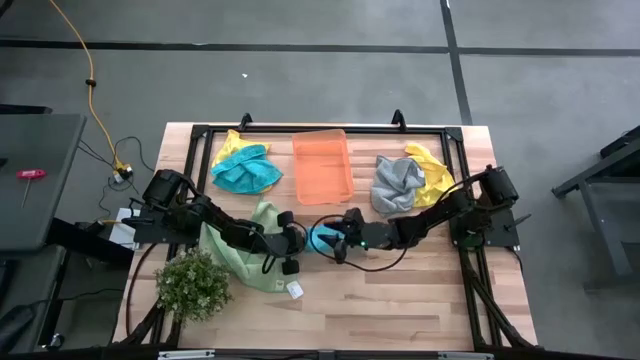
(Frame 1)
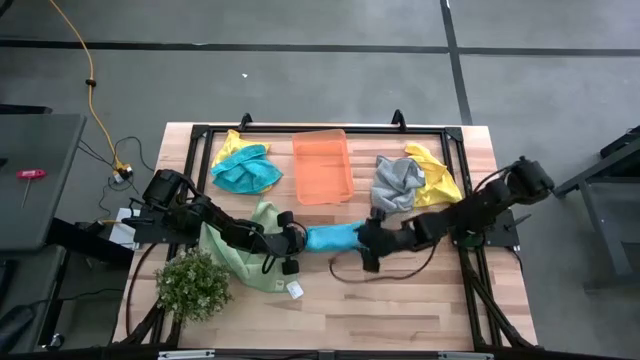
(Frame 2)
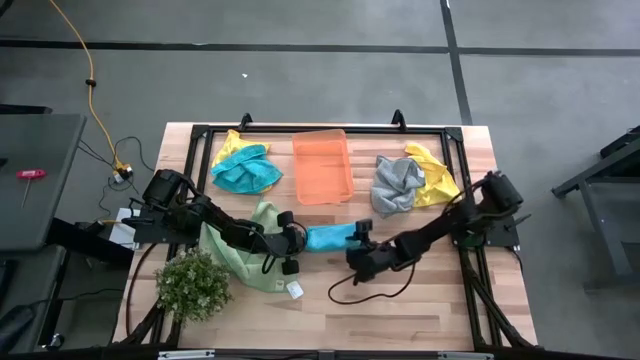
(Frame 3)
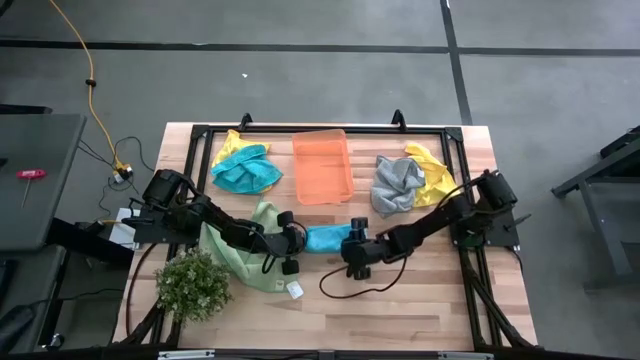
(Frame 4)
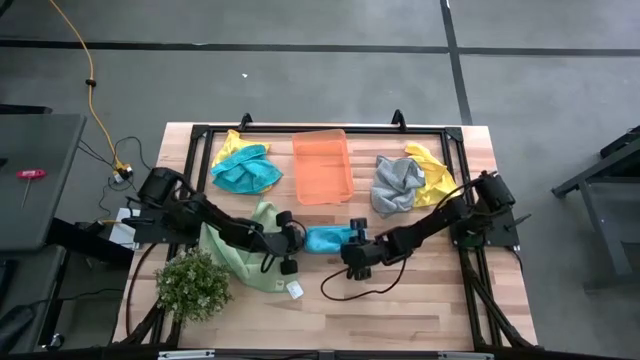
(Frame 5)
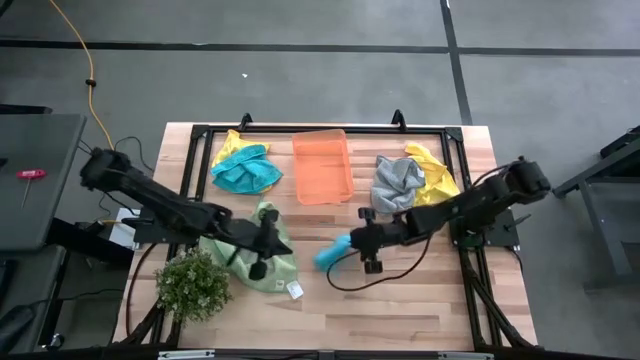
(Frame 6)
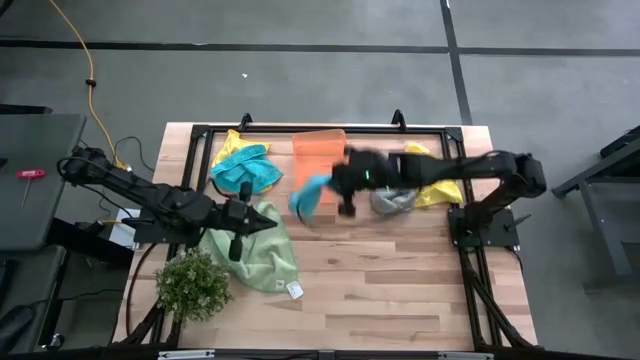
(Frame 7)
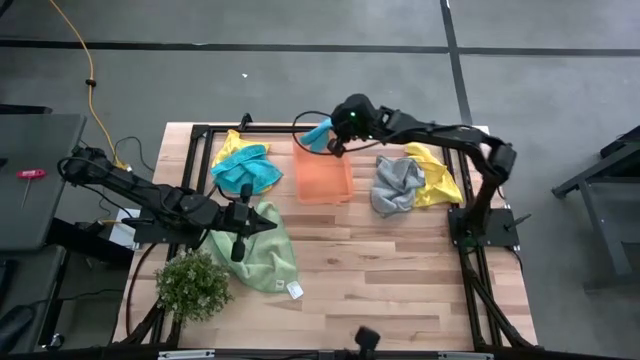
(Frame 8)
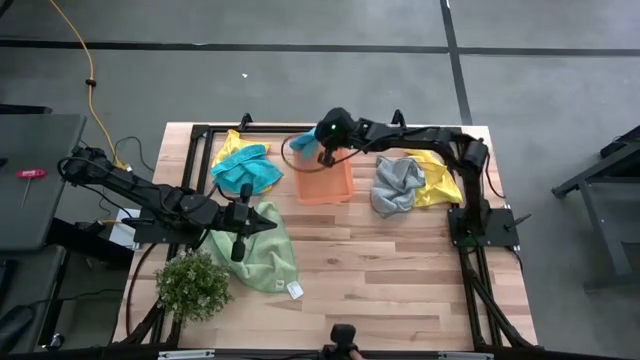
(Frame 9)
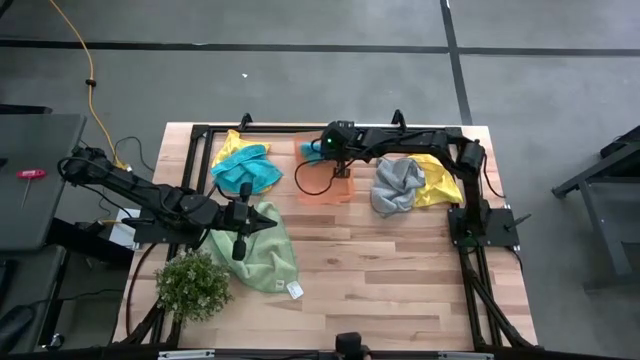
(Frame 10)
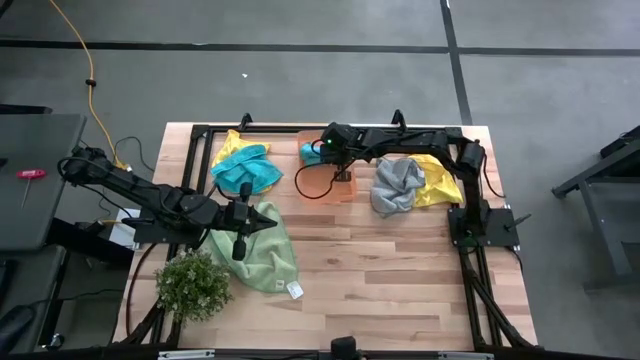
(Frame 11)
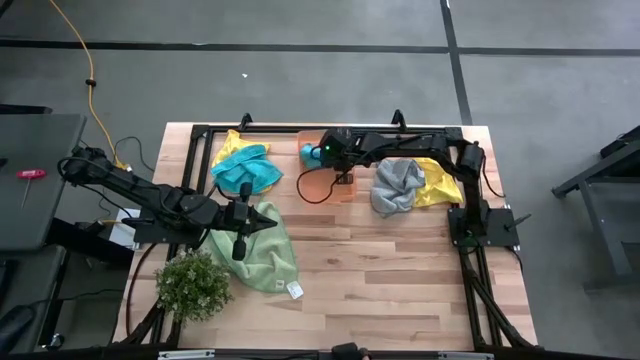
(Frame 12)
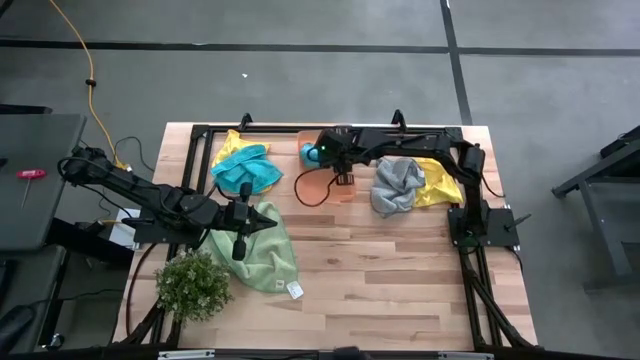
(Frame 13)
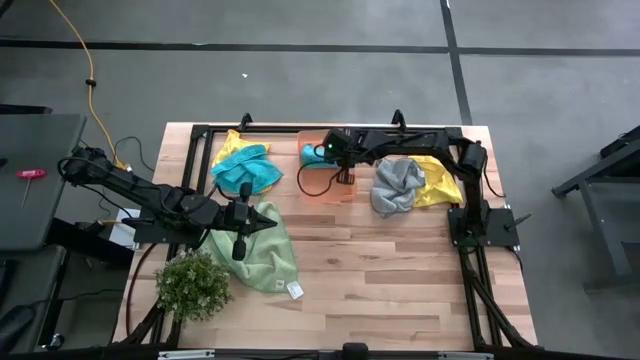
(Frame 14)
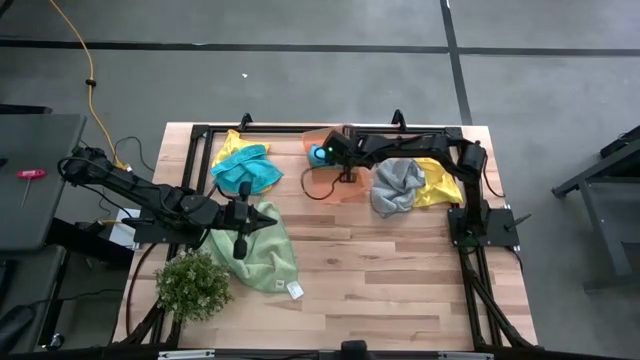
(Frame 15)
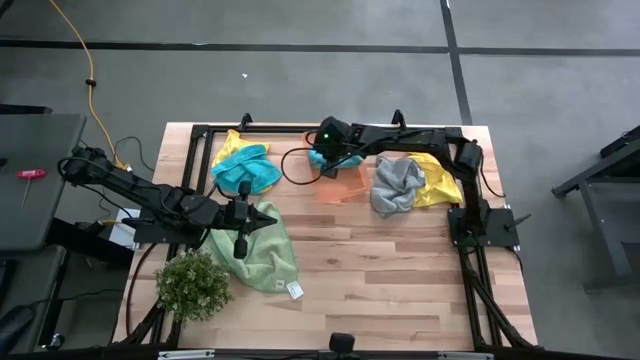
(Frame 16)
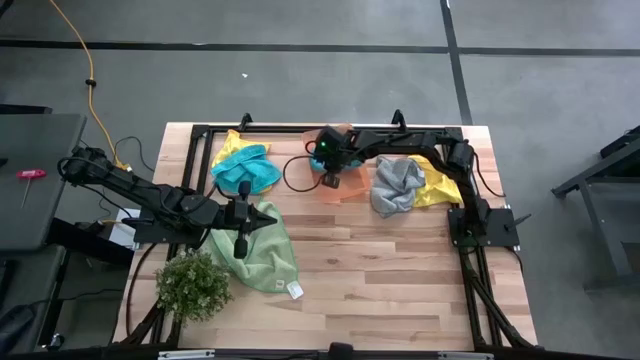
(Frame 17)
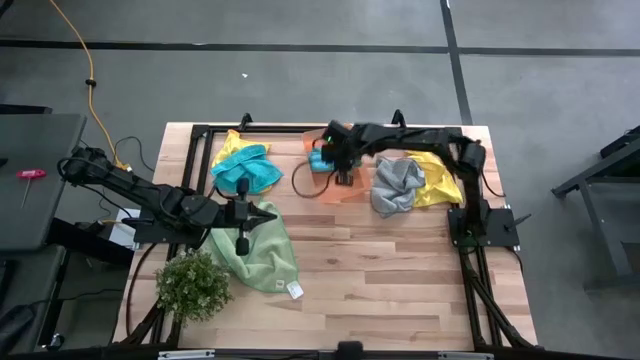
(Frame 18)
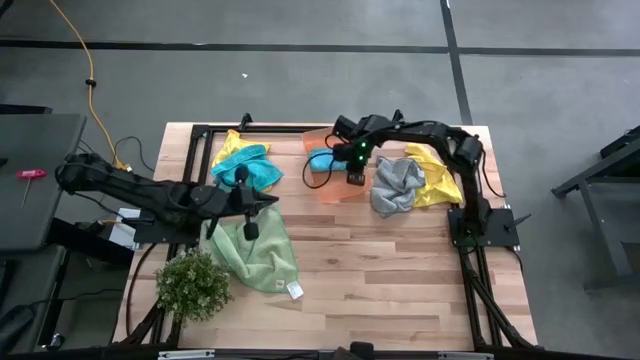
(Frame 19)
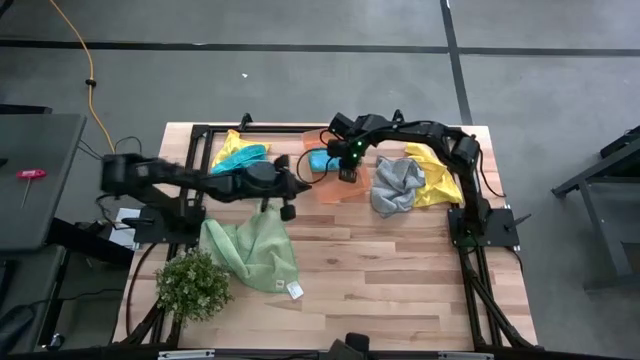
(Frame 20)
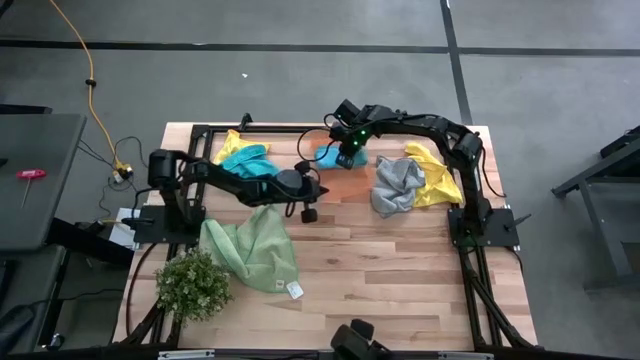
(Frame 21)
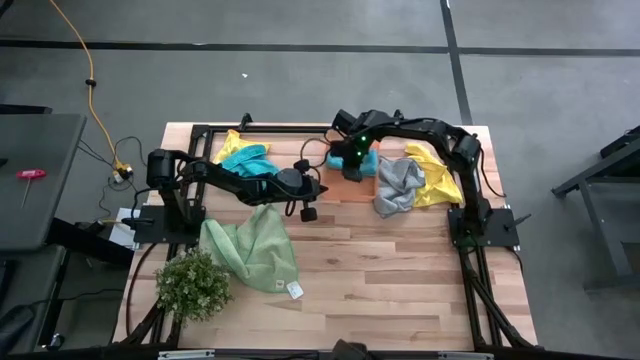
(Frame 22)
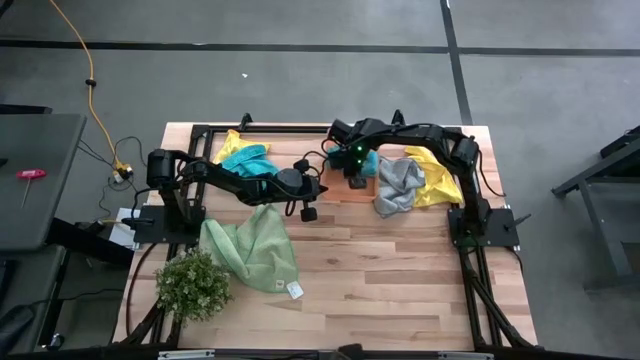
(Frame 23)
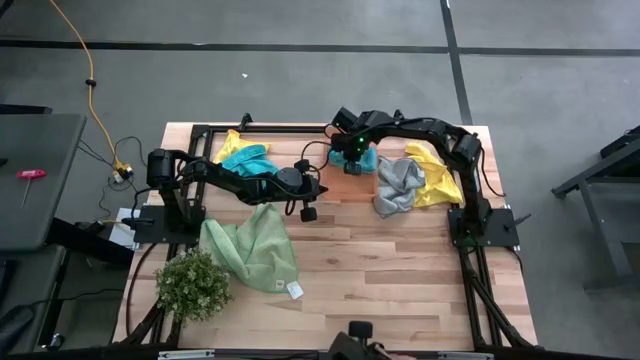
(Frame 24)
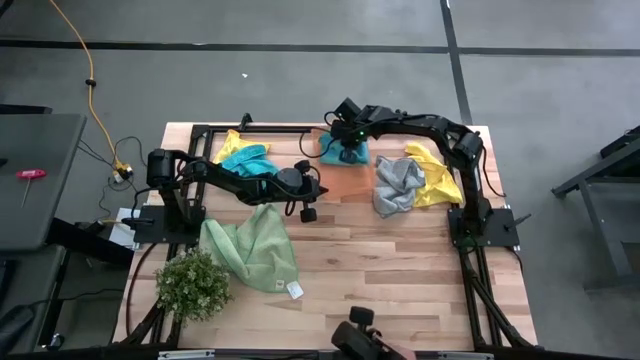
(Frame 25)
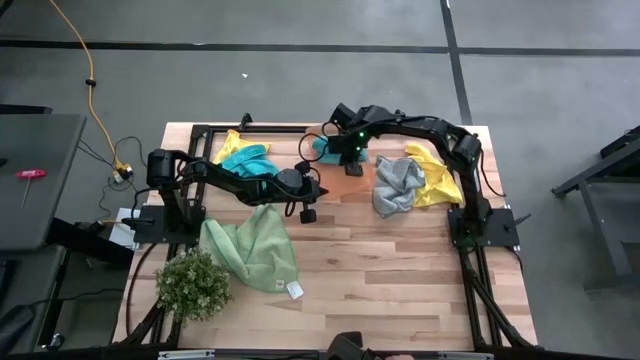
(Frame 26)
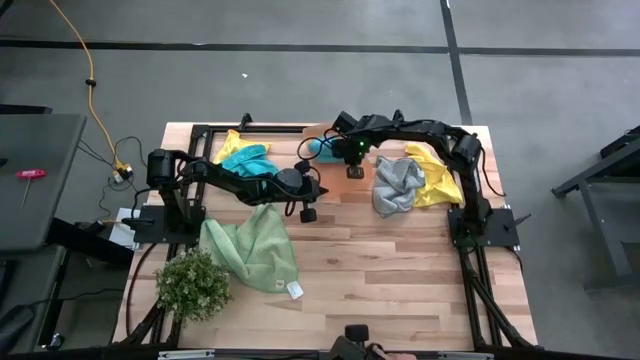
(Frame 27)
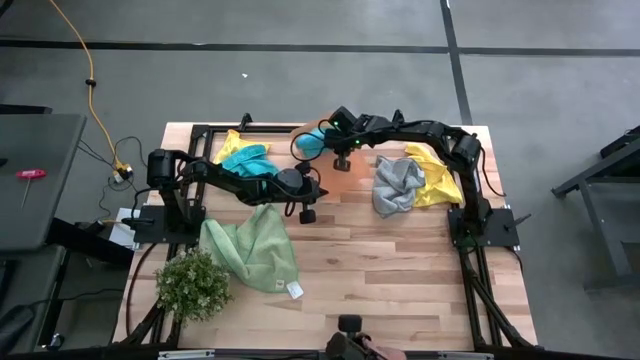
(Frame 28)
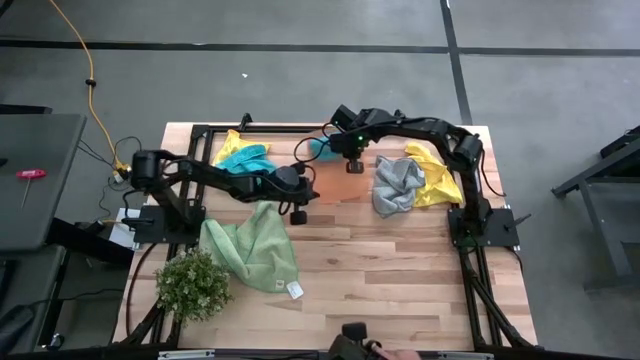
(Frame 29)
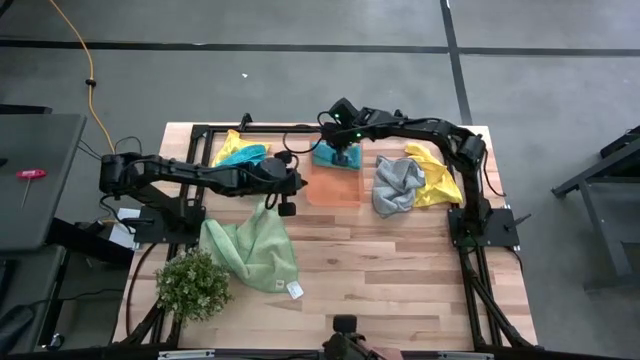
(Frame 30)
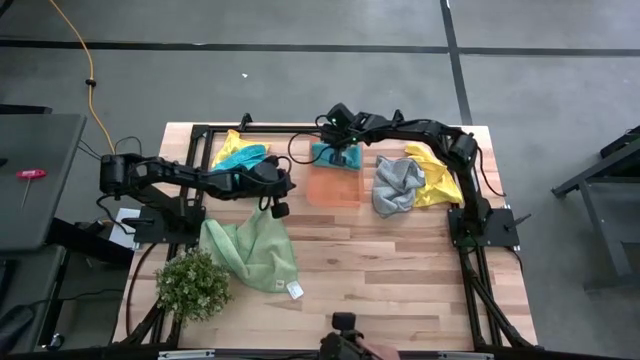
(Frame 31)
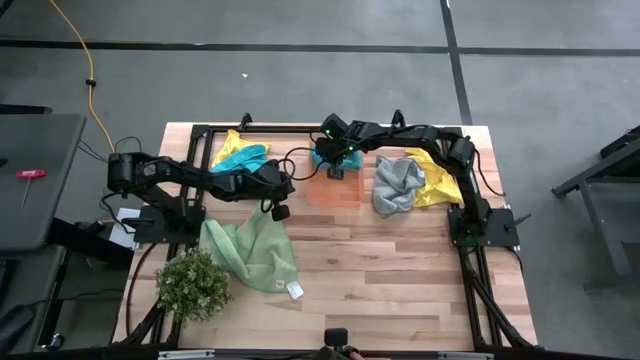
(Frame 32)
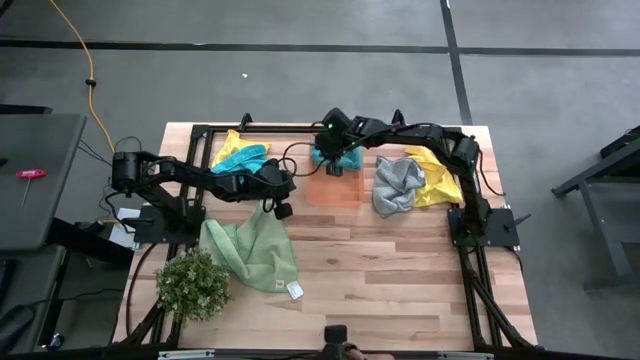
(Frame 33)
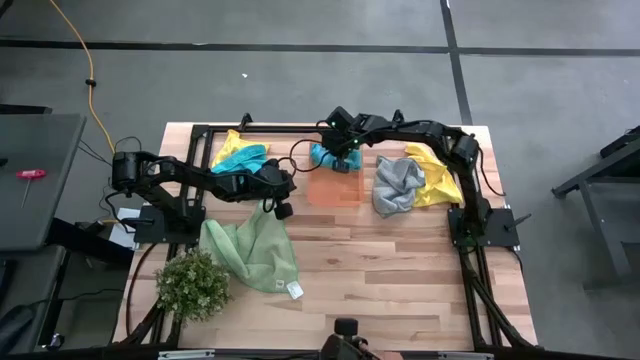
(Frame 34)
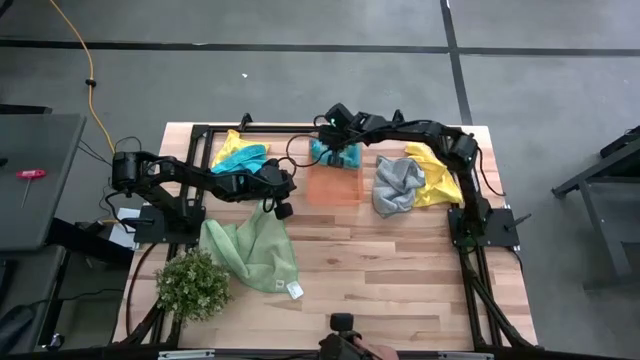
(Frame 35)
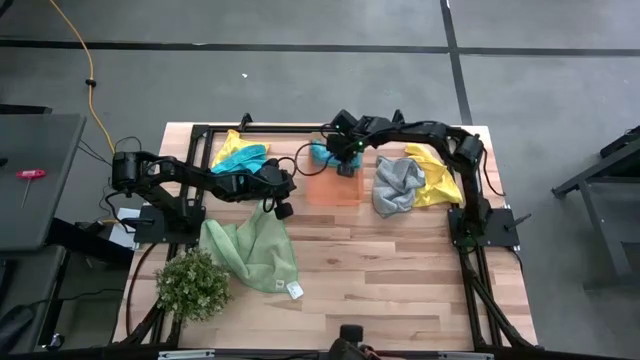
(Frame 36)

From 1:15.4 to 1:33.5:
Task: Fold microfiber towels
Put the bottom folded blue microfiber cloth into the orange bin
